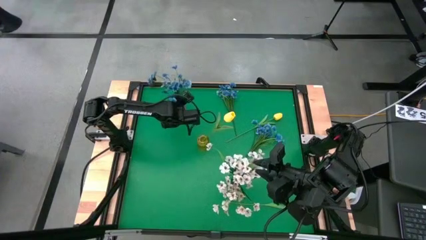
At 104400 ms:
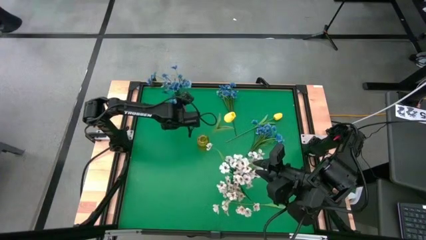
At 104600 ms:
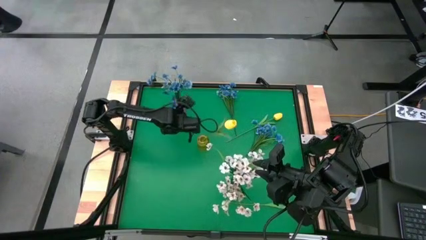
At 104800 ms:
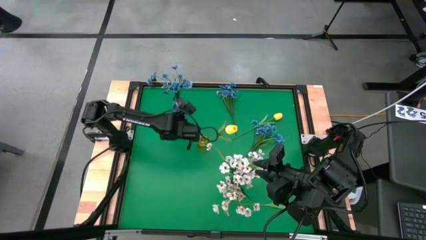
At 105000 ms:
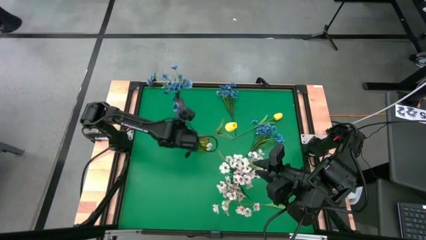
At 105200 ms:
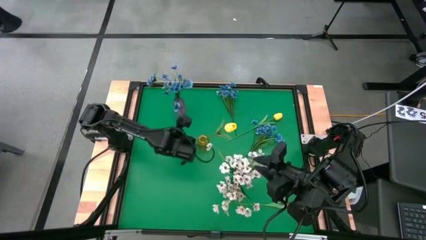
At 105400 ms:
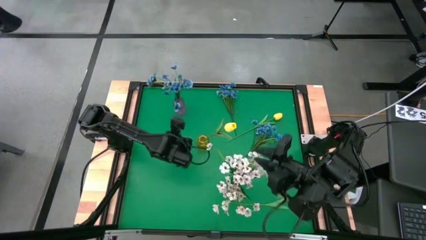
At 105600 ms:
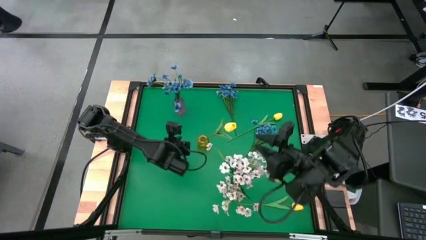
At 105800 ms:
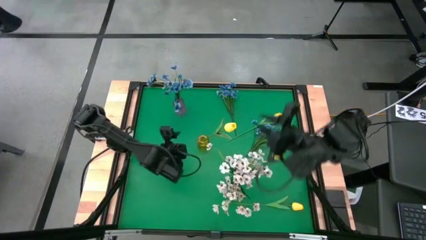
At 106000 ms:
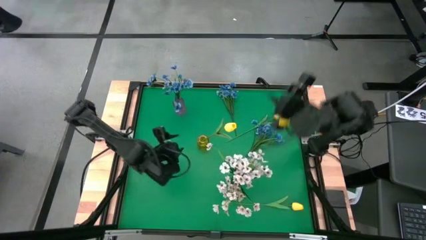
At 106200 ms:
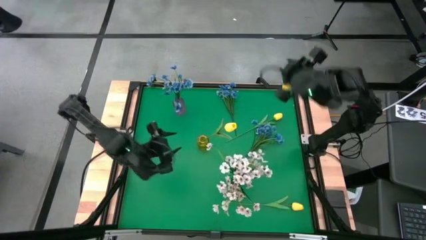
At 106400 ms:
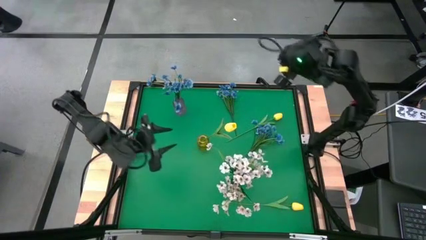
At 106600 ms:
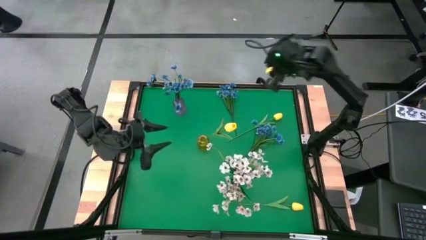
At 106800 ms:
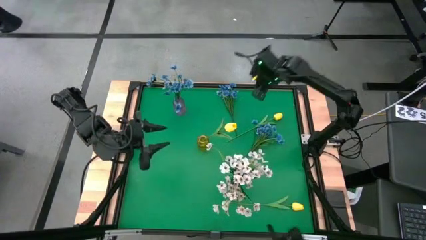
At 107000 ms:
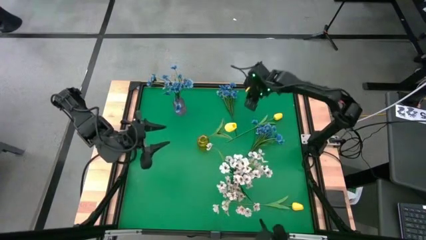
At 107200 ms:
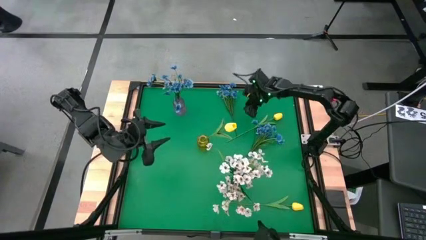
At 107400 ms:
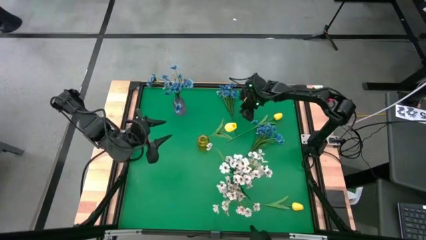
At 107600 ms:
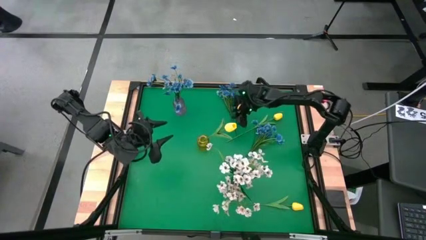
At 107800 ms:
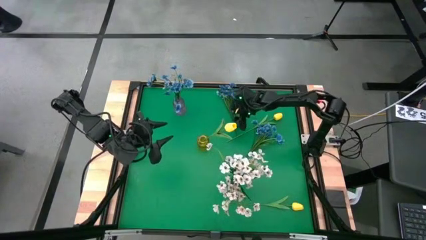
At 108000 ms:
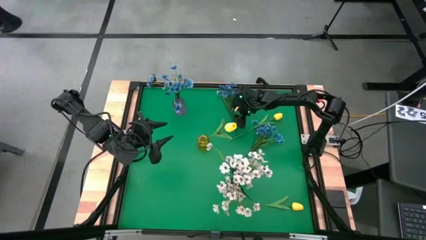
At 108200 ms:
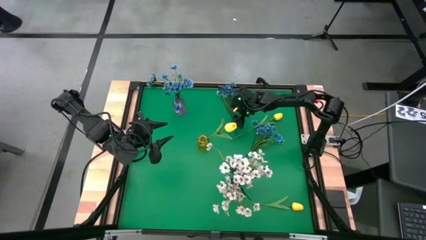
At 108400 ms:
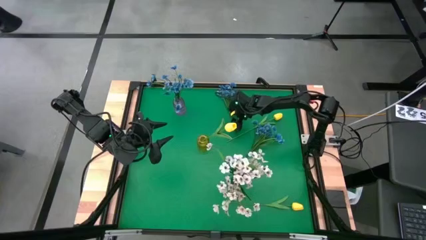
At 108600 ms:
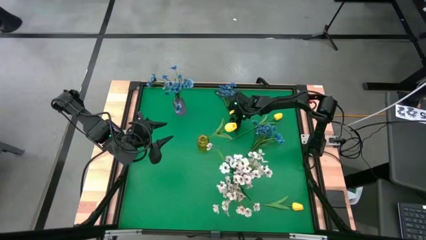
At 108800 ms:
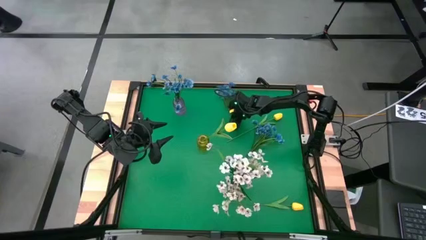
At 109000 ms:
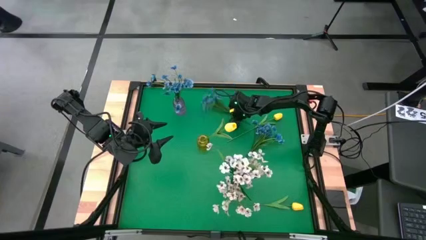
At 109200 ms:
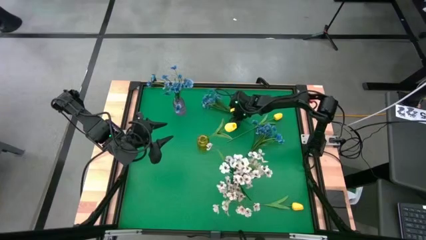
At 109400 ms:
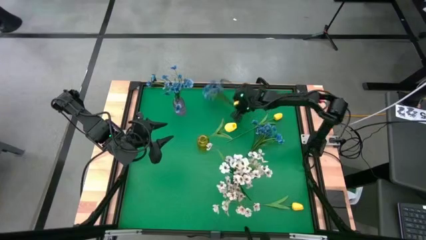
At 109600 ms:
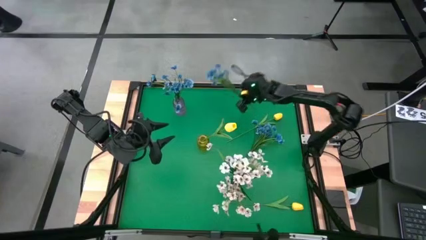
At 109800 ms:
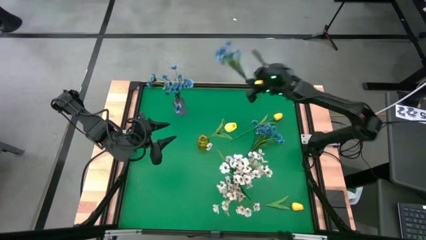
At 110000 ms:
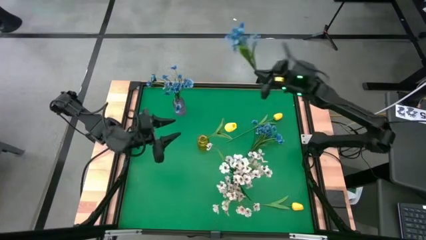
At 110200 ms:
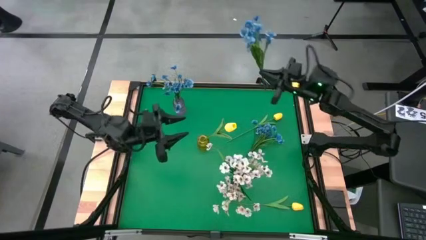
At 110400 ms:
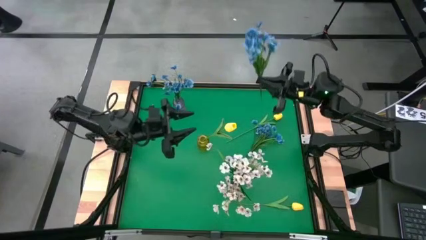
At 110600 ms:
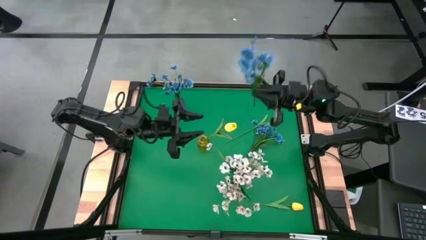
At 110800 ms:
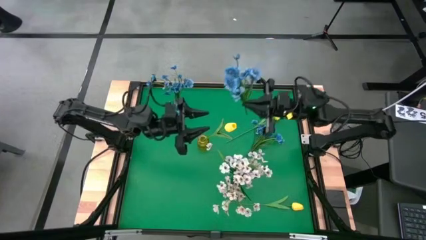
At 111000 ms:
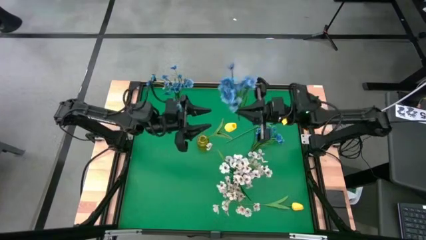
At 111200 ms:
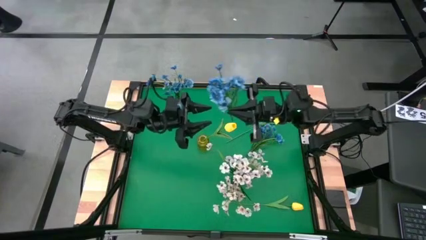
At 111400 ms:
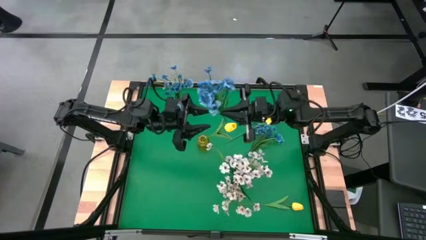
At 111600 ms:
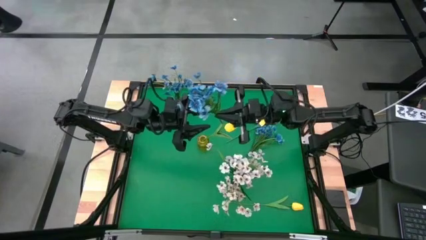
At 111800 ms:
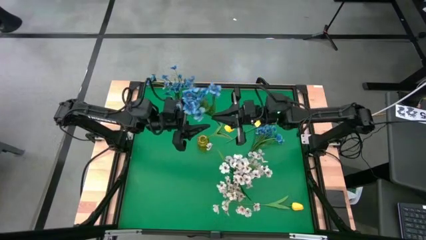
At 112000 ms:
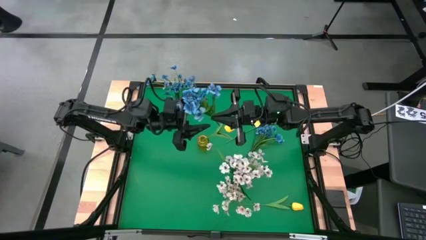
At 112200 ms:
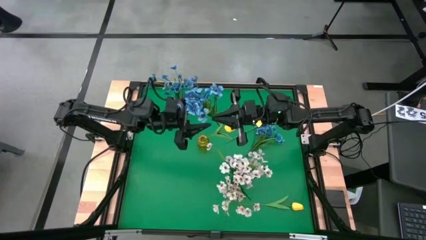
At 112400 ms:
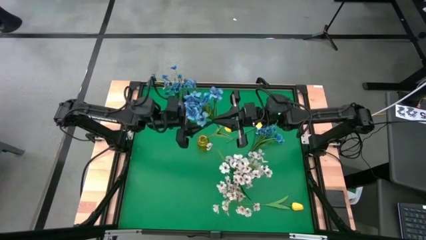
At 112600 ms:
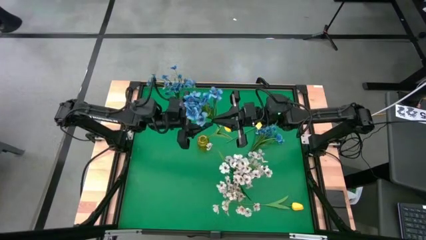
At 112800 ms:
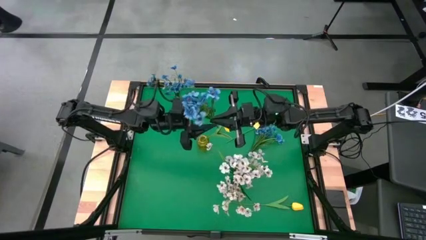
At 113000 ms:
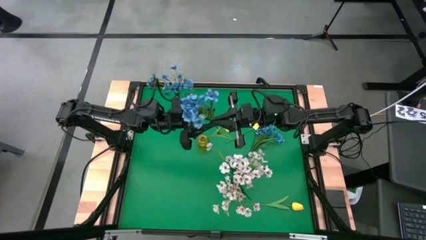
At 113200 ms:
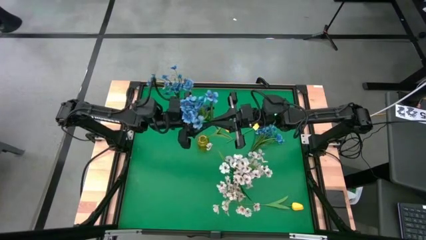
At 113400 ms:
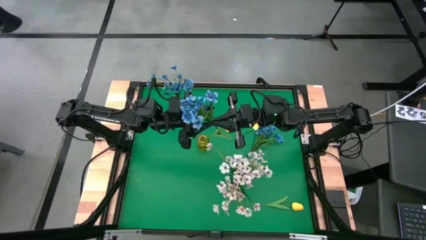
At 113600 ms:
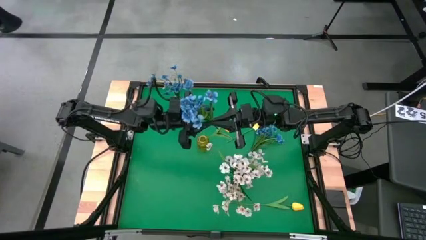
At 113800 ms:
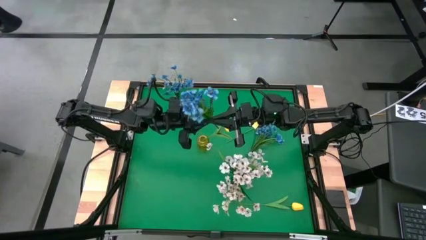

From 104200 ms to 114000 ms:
Task: Sort flowers into vase by color
Put the top blue flowers into the purple vase

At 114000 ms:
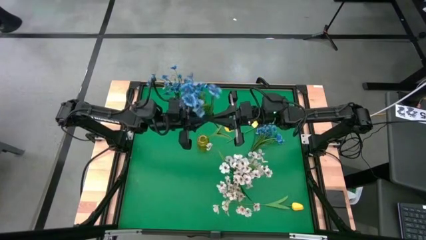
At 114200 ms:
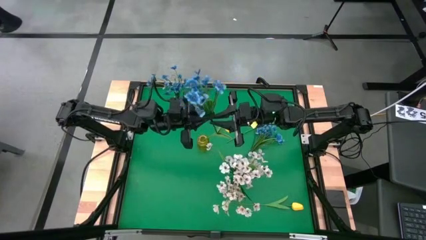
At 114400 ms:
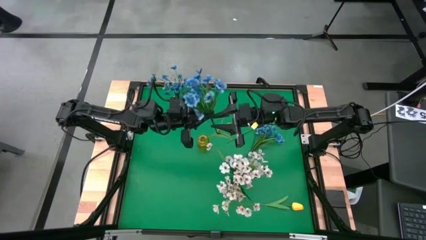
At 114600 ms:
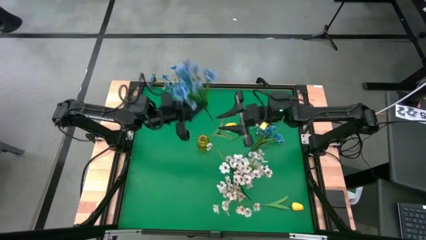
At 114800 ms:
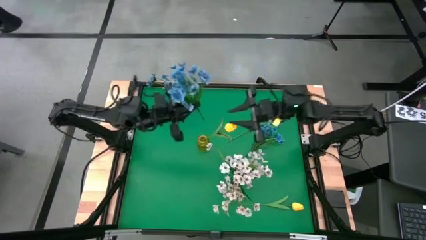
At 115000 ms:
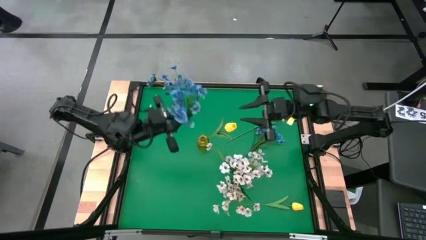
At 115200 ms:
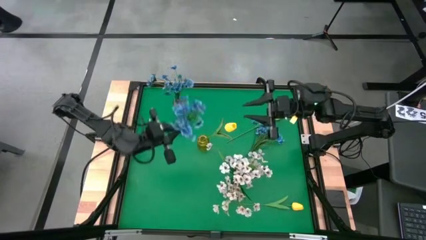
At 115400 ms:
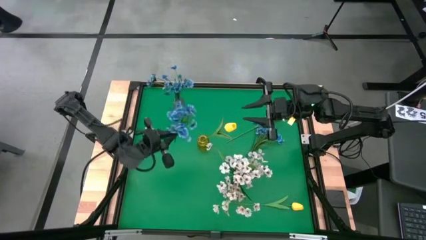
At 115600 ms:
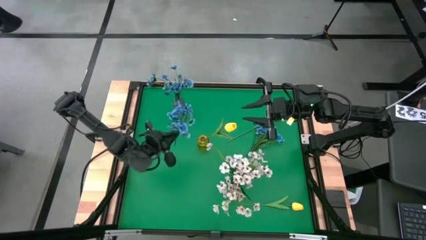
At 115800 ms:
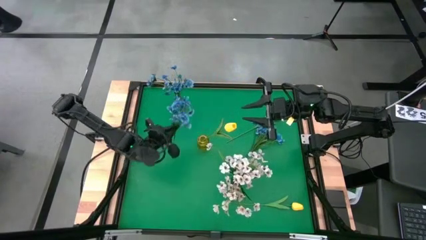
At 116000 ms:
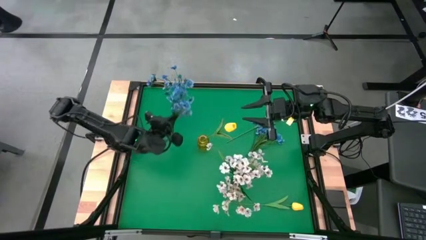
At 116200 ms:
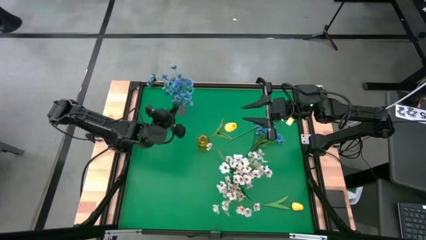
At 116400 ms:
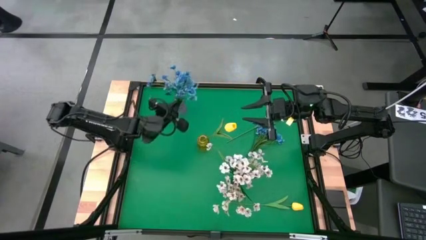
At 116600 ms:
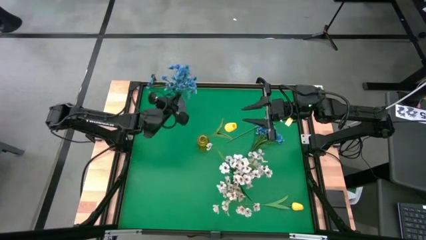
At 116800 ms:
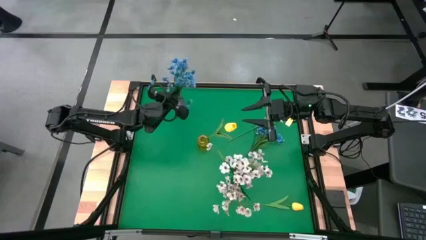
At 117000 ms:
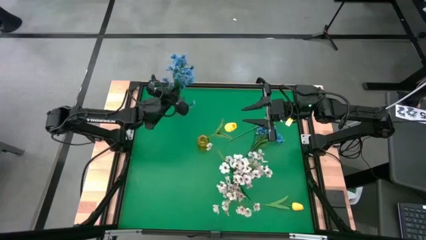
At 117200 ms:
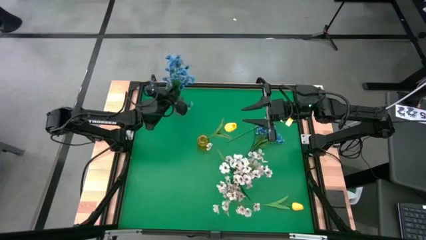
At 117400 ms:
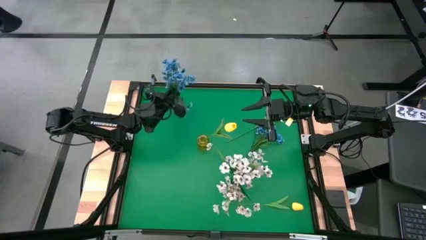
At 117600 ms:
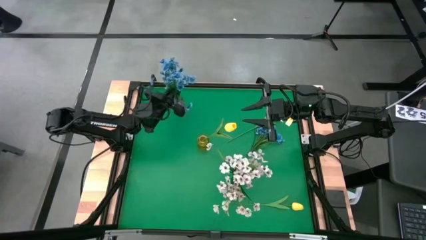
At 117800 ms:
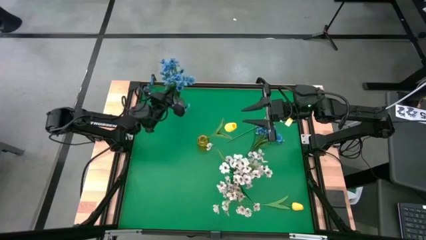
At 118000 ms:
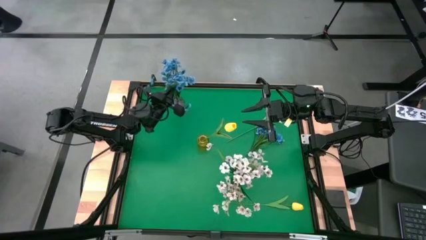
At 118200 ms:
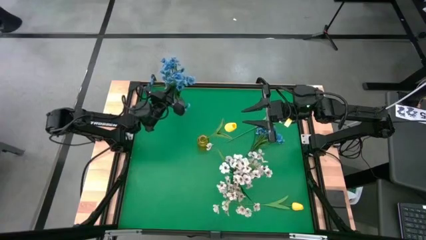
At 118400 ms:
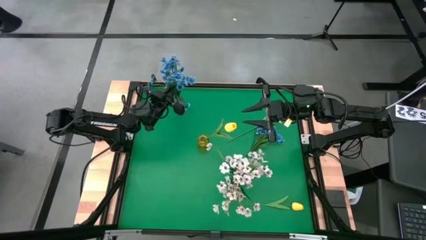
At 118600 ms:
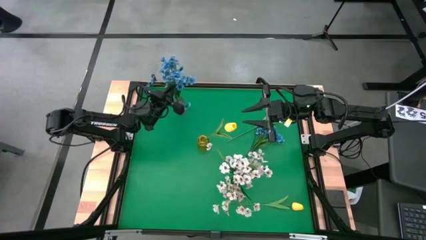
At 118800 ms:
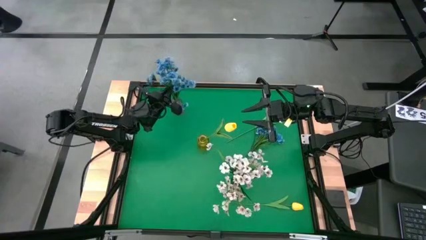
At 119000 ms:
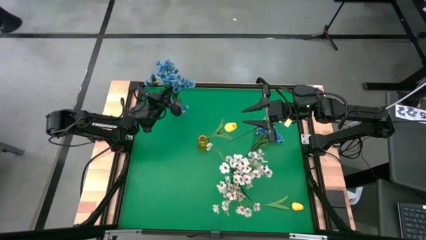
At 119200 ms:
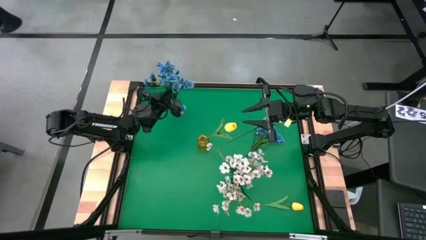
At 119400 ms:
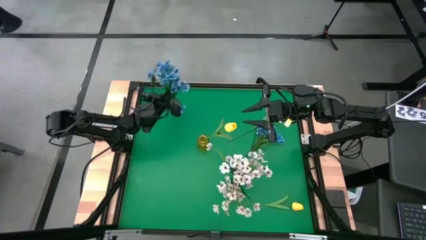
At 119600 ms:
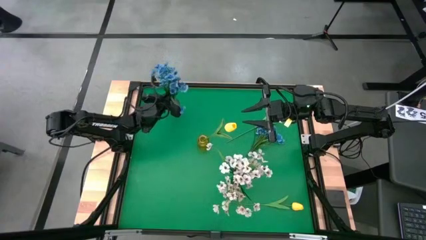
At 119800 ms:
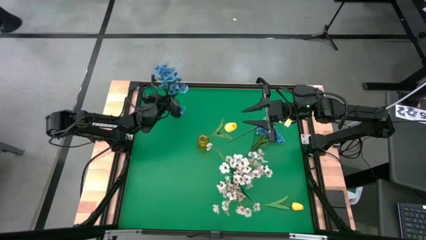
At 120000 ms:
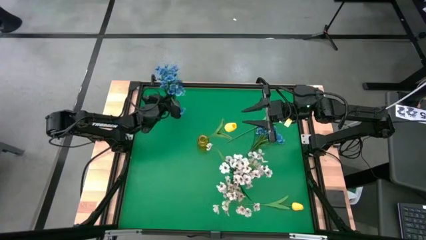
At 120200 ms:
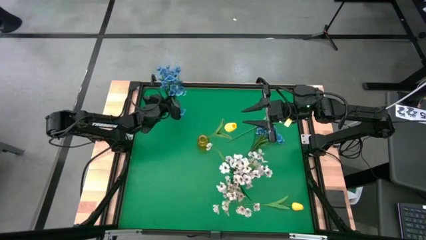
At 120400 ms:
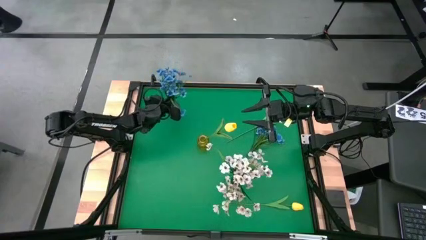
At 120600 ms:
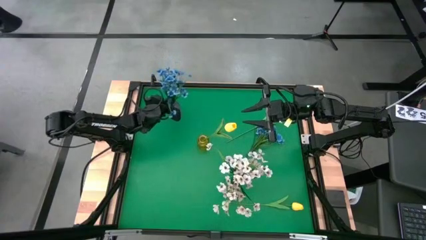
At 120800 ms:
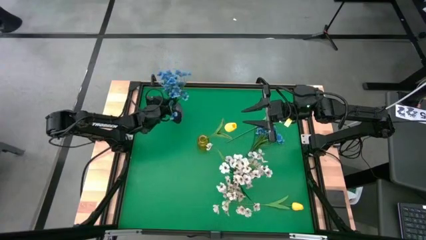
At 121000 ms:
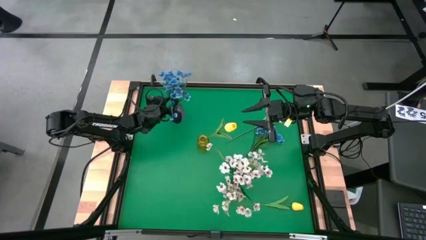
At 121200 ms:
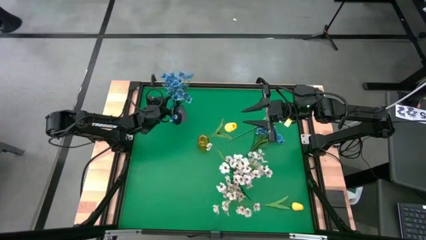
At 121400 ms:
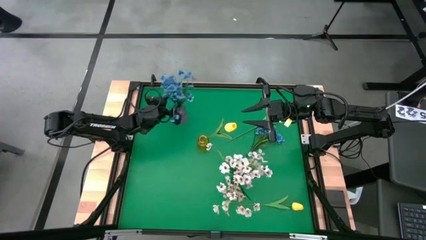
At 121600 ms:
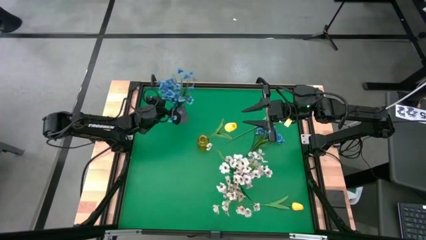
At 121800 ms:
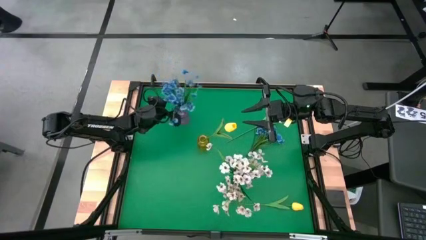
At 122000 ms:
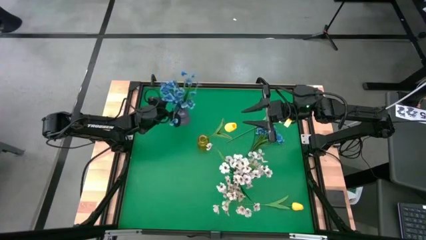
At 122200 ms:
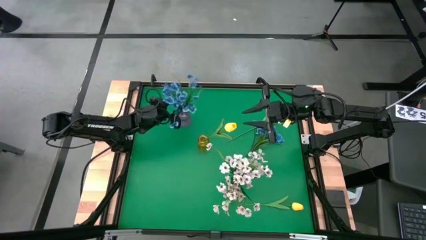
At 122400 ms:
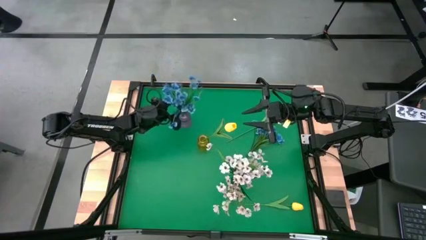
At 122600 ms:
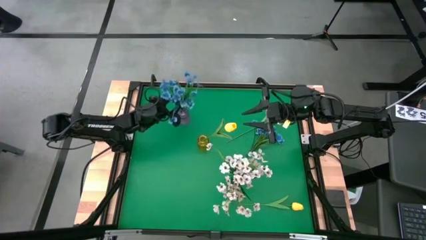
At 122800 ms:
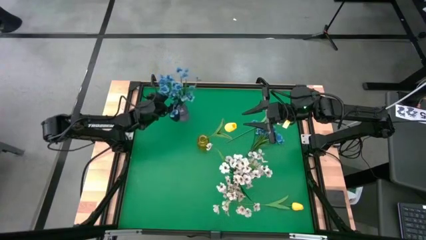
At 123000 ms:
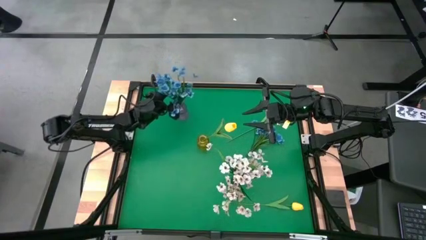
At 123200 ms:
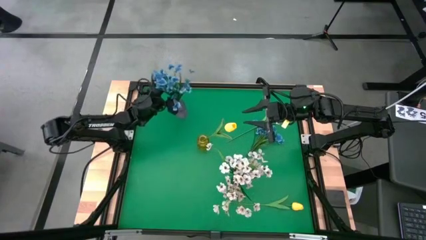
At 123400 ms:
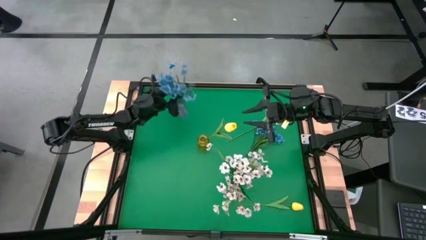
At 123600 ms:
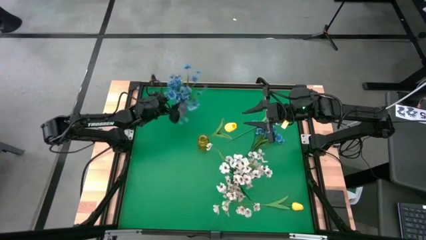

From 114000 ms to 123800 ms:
Put the top blue flowers into the purple vase
